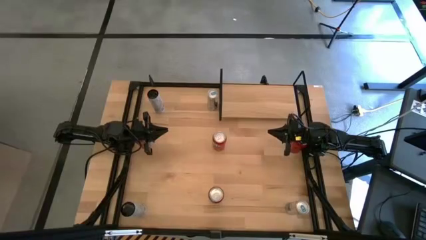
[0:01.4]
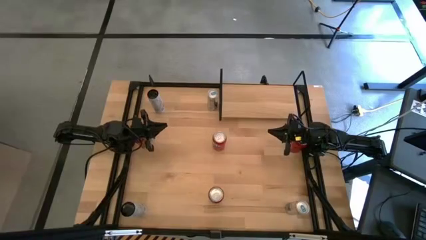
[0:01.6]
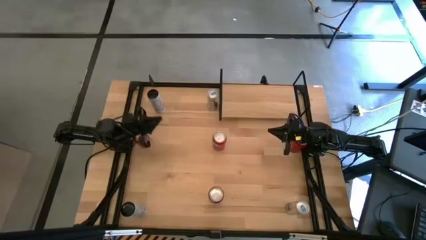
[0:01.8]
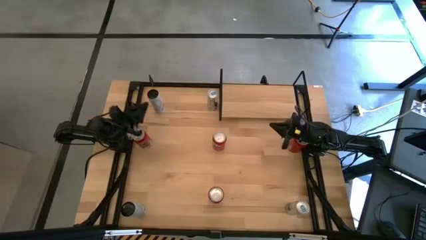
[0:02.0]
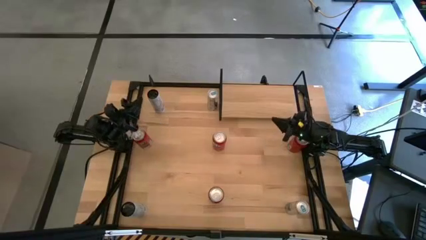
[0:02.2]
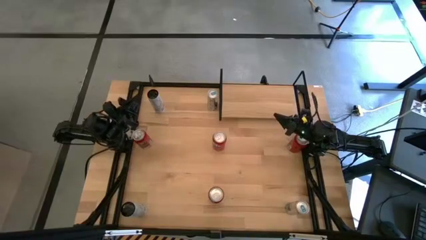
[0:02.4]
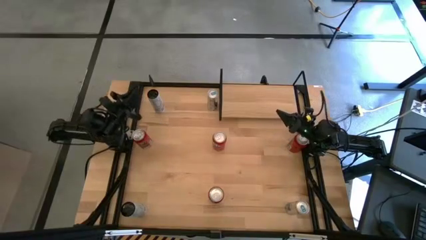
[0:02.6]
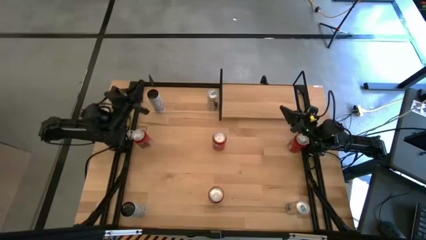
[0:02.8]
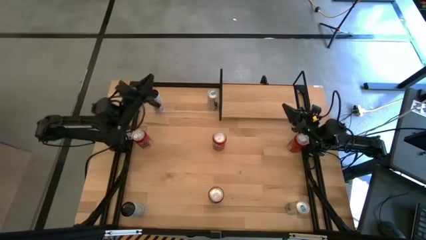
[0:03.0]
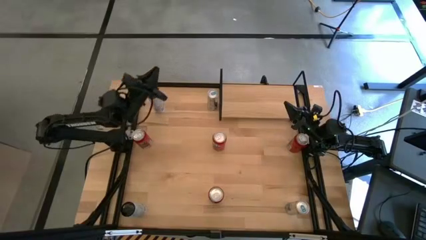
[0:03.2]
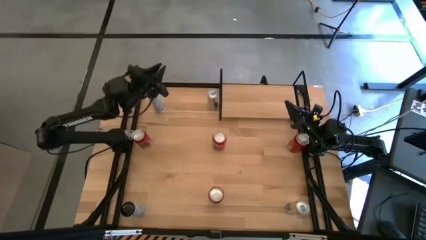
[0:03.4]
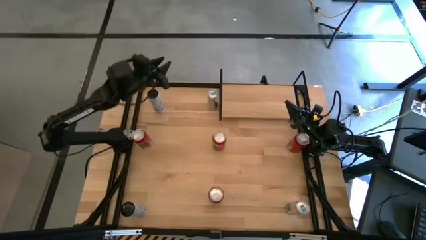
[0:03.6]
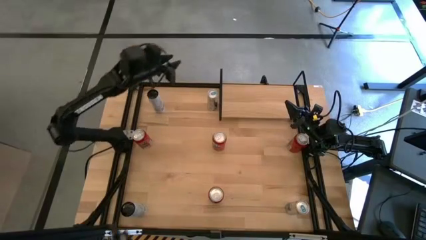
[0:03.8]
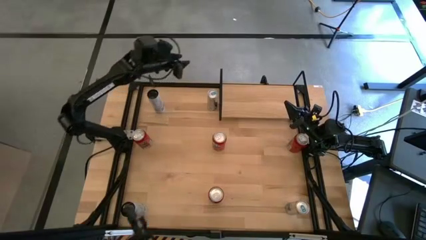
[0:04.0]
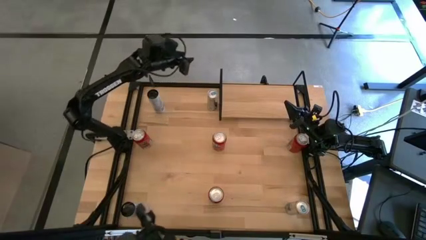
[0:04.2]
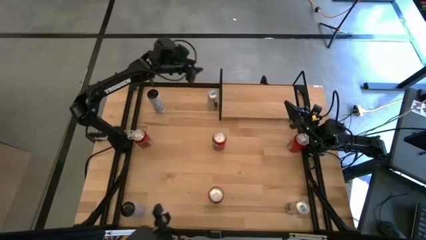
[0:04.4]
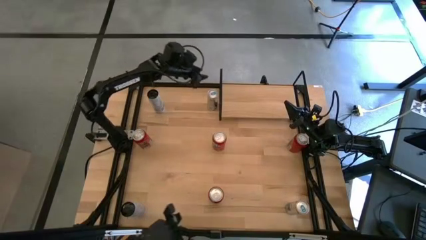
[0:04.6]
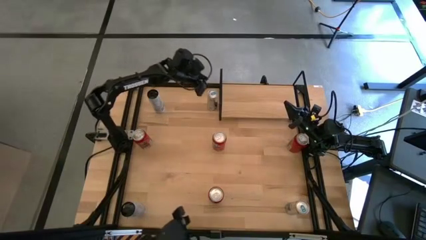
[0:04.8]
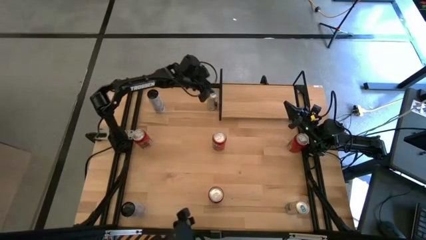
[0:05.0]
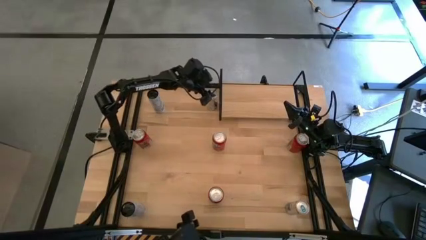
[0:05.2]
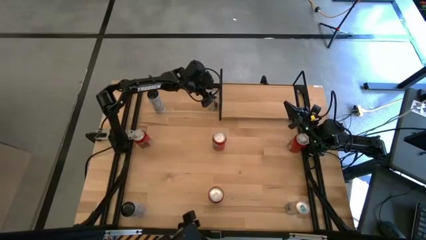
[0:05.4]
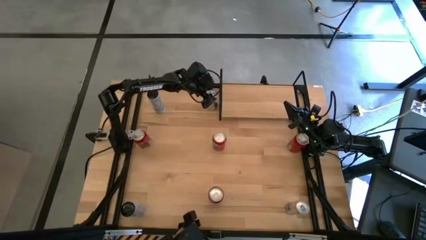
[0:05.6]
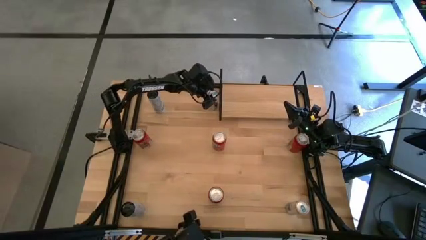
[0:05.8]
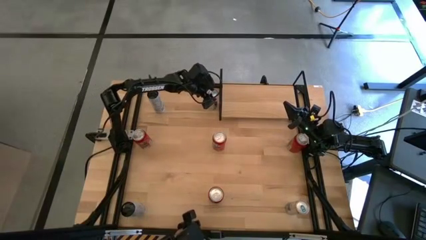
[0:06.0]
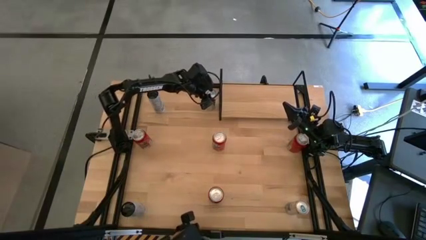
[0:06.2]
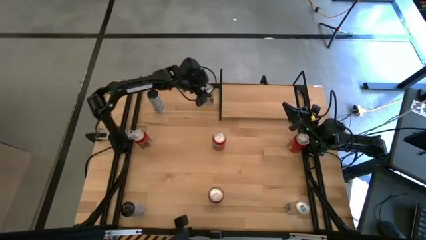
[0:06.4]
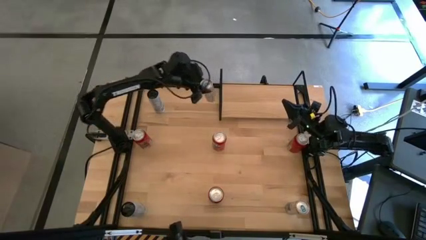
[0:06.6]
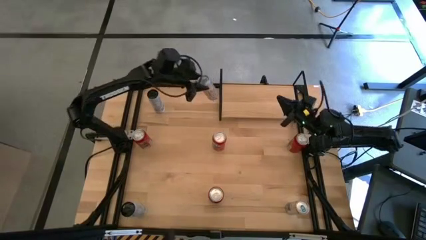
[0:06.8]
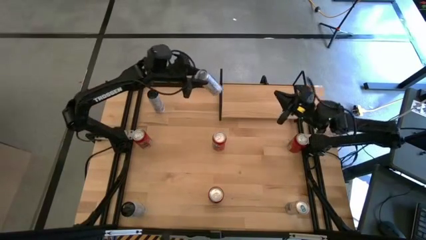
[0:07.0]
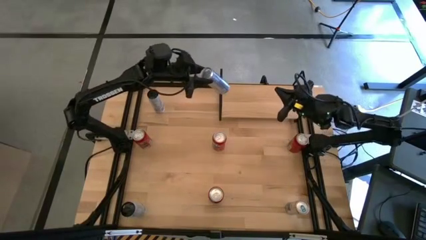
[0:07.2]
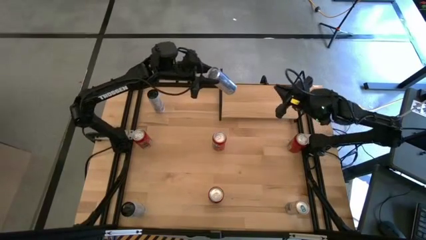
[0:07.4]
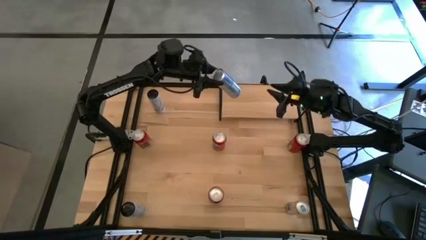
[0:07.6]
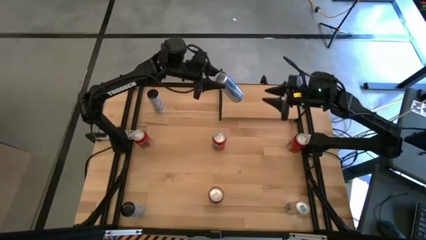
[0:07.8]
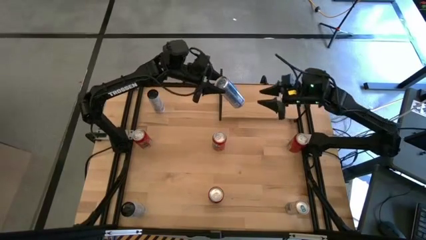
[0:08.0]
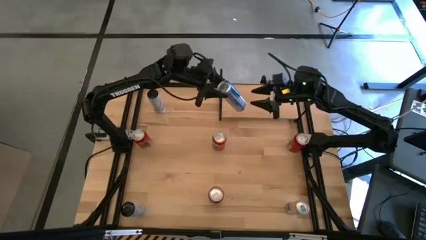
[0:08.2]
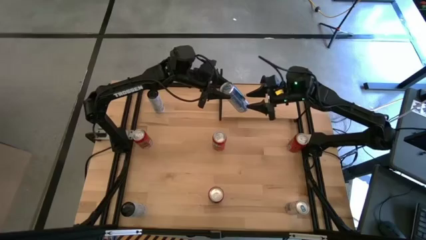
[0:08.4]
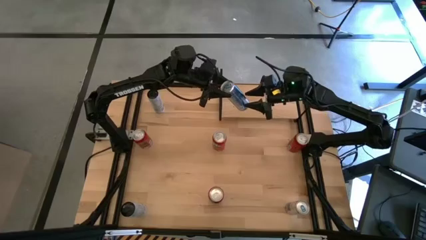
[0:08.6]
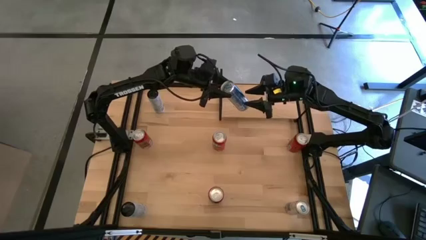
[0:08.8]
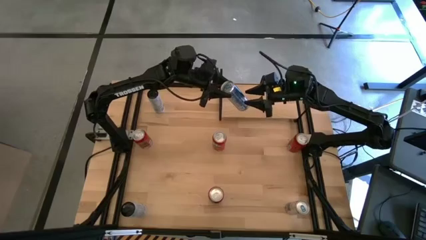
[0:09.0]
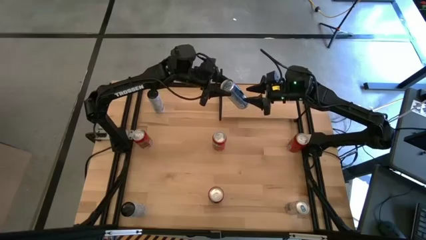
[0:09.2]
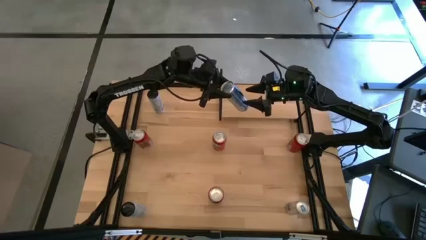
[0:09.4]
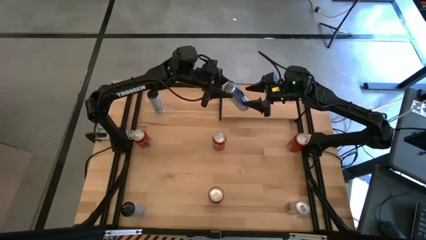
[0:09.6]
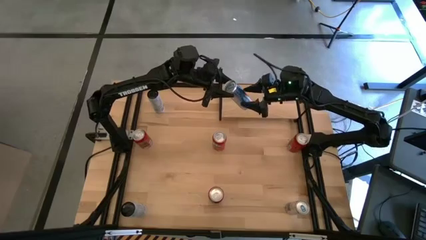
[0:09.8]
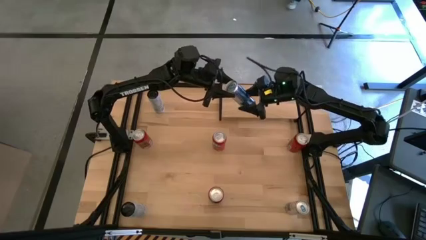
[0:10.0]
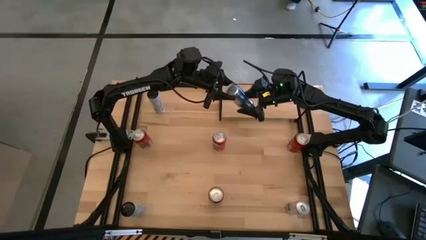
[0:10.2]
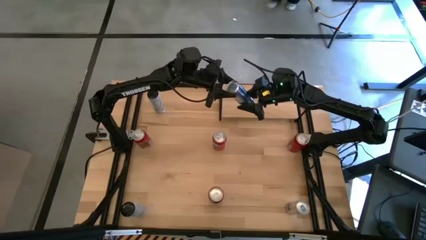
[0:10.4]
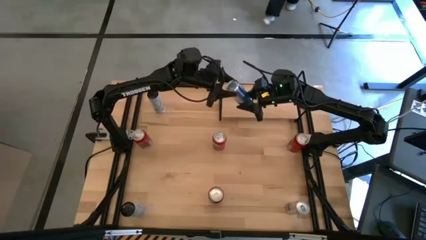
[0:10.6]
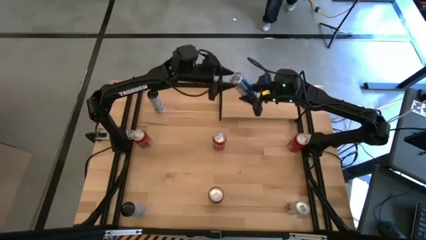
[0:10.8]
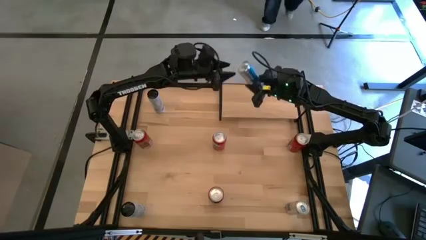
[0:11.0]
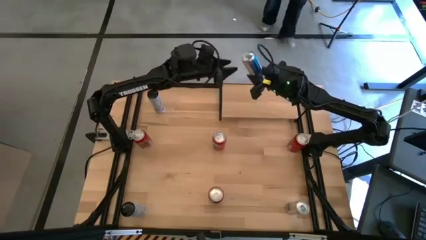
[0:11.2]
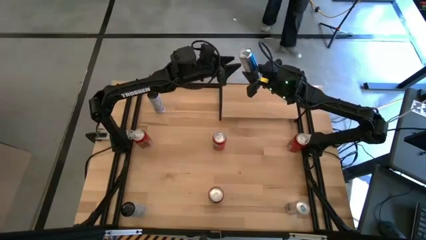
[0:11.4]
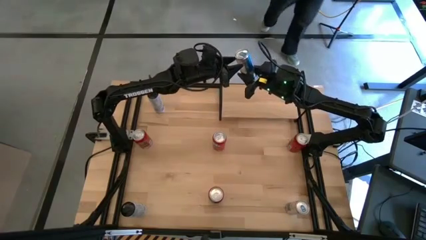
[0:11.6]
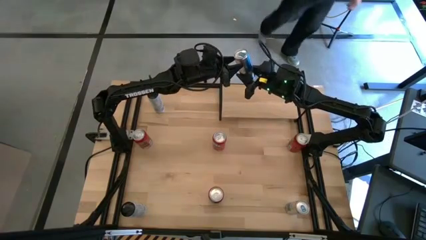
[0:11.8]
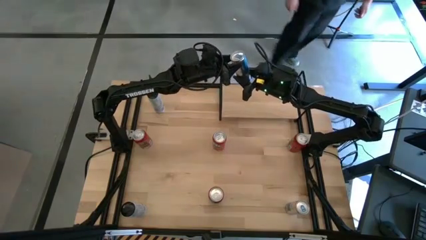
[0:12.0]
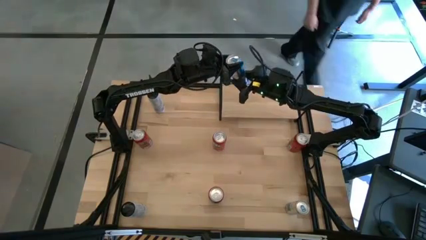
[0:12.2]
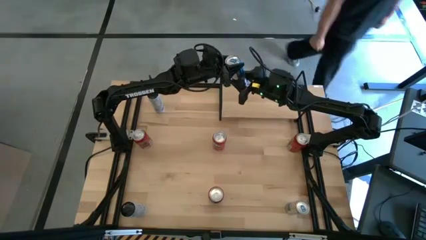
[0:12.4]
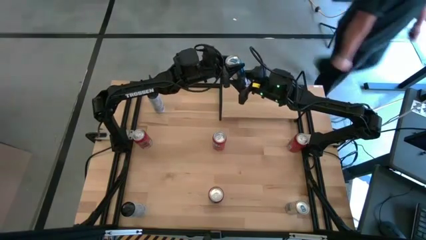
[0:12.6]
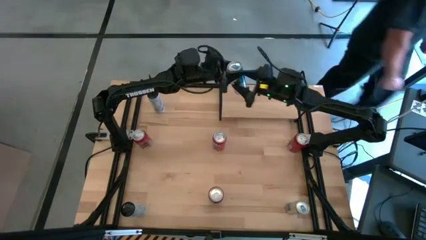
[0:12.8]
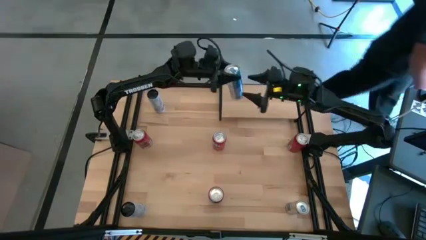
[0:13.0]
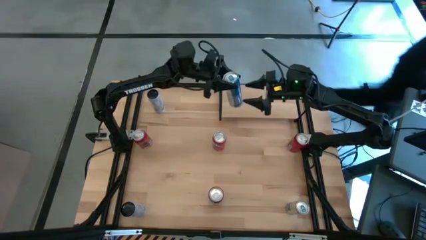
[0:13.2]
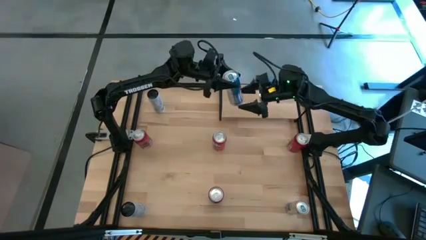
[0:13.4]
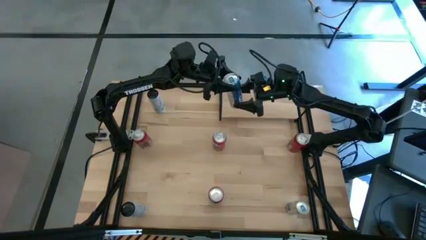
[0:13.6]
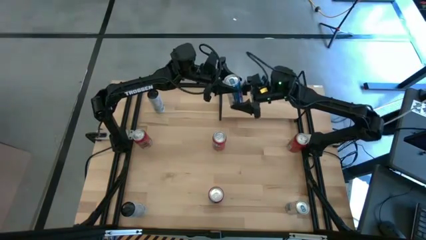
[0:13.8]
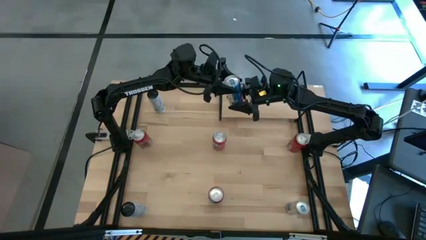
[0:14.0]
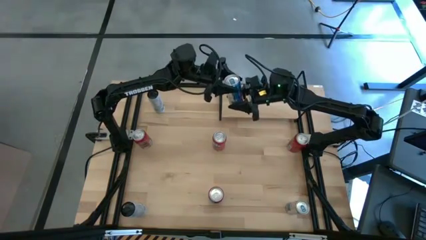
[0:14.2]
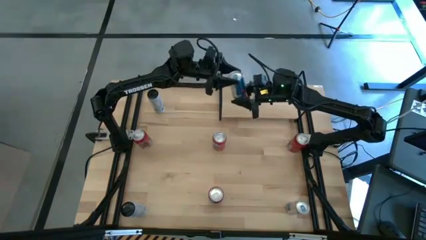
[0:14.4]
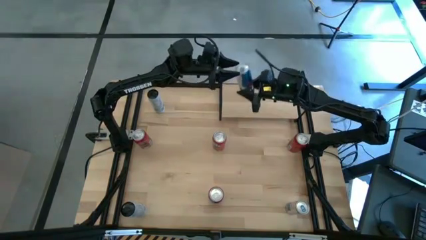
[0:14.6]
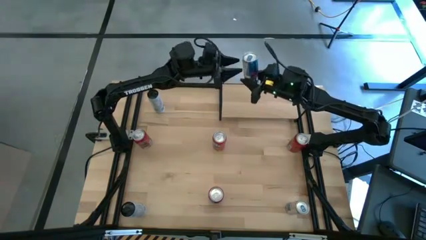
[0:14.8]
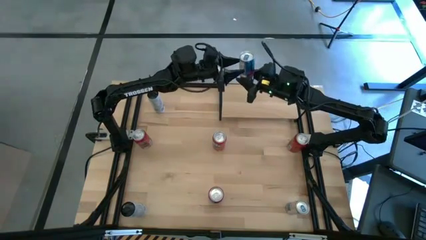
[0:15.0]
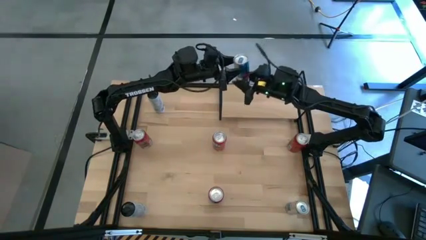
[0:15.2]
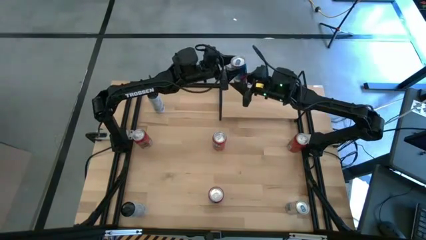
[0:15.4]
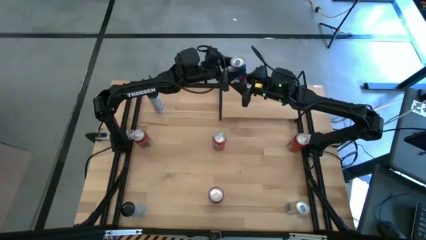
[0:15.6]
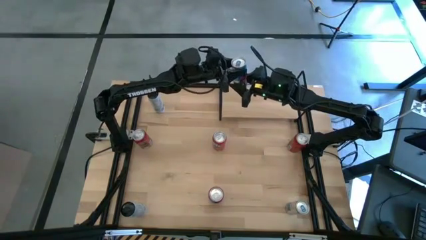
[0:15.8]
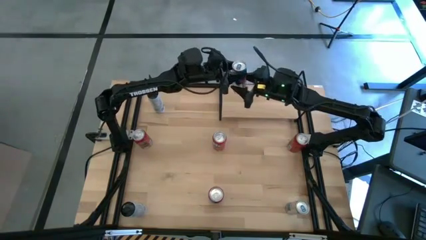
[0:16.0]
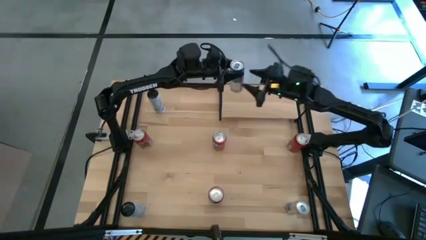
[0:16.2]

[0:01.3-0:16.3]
Task: Place canned beverage on shelf
Put the top blue soda can on the shelf
